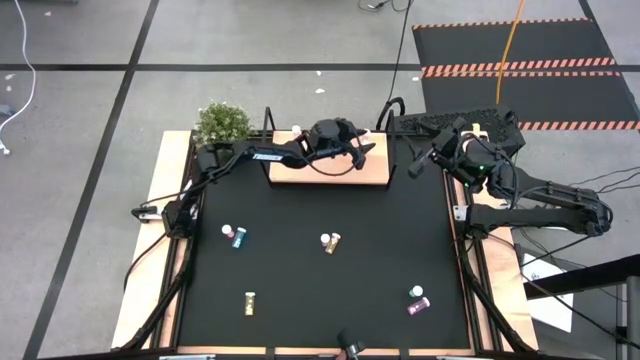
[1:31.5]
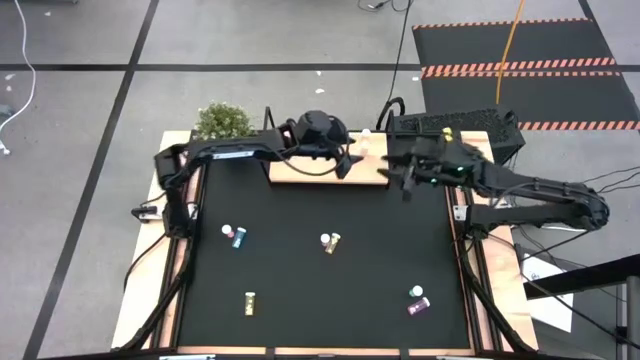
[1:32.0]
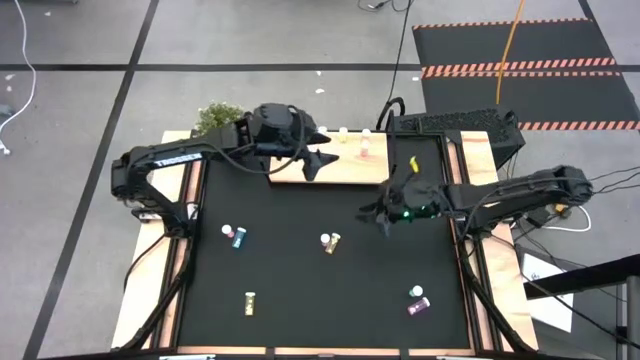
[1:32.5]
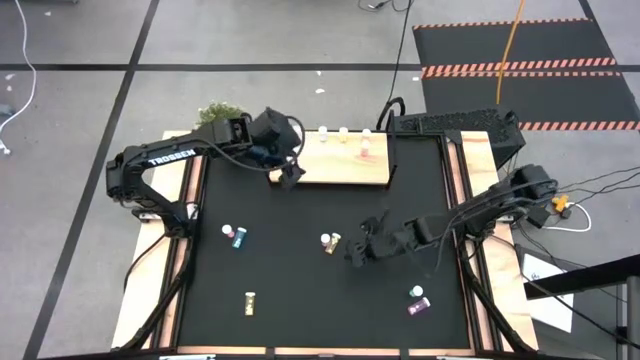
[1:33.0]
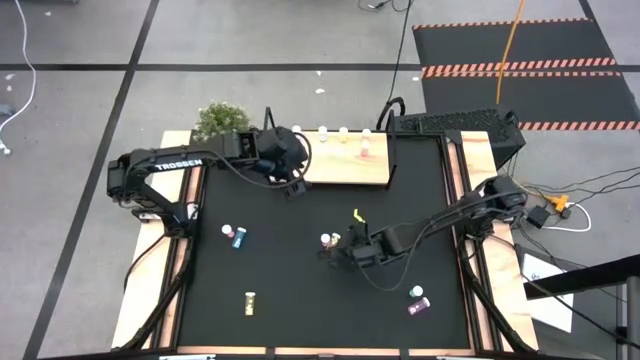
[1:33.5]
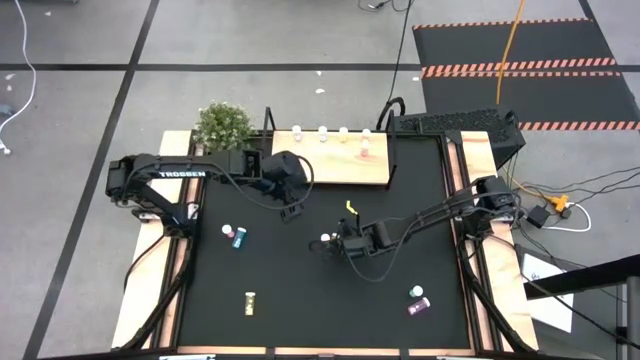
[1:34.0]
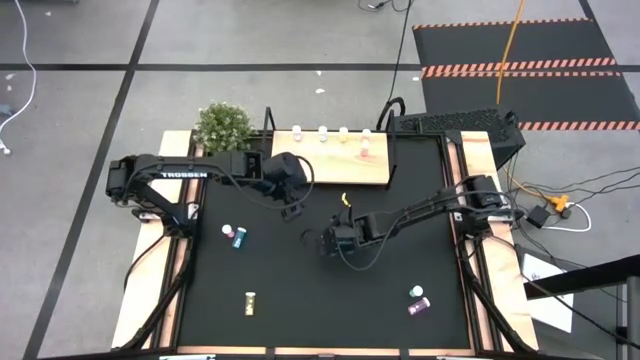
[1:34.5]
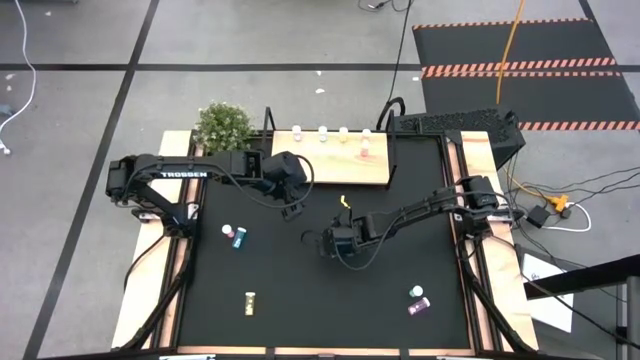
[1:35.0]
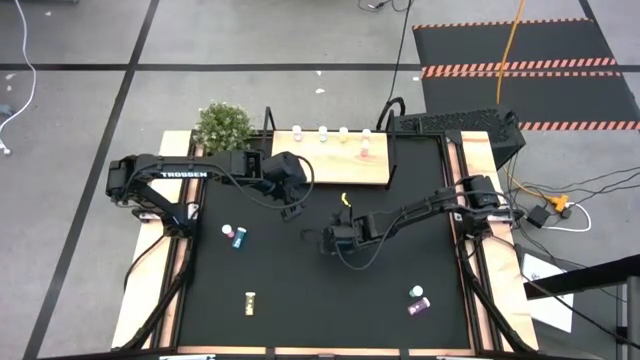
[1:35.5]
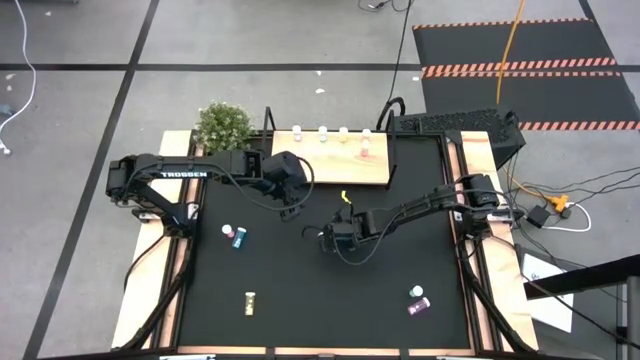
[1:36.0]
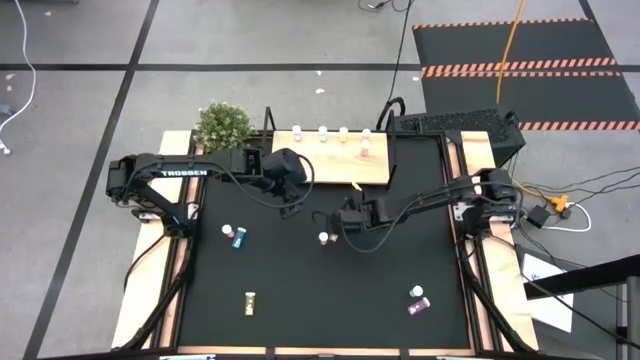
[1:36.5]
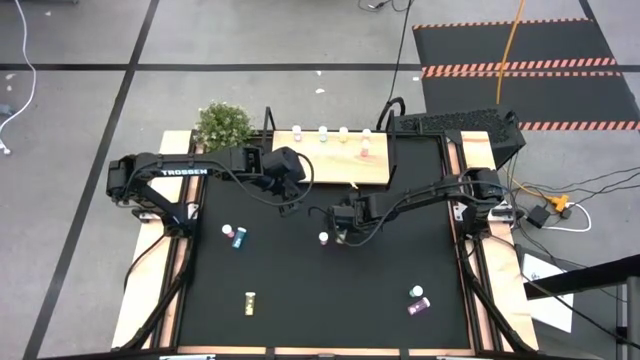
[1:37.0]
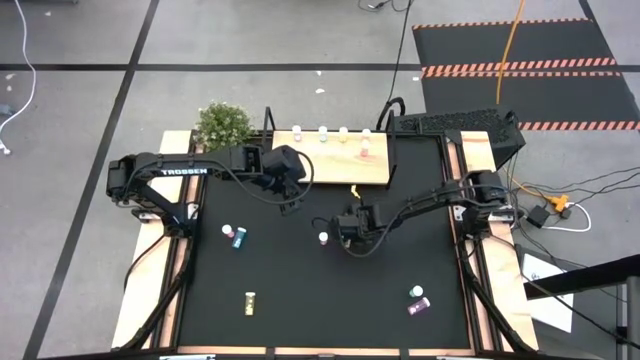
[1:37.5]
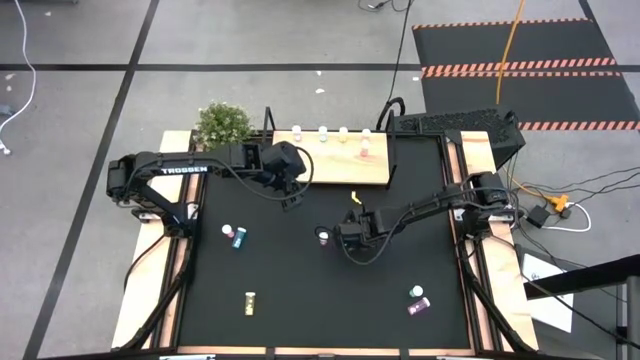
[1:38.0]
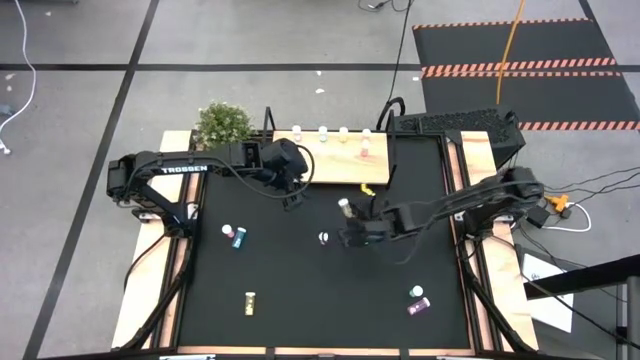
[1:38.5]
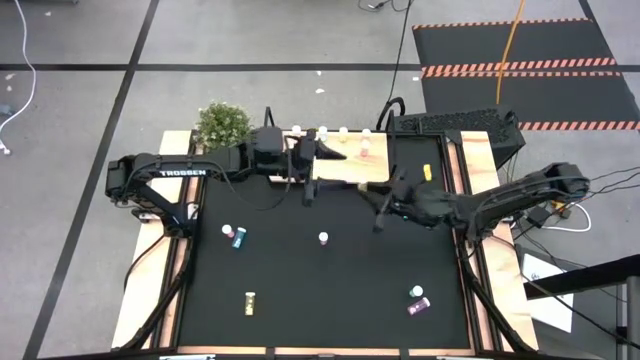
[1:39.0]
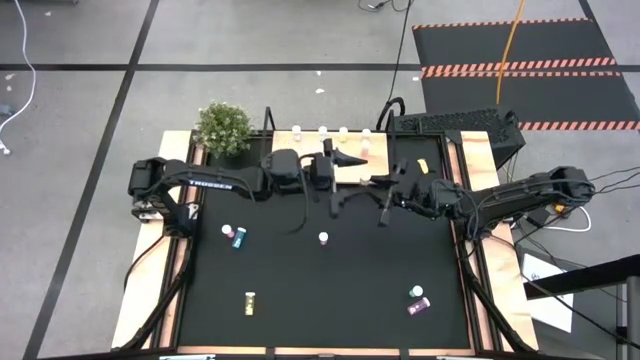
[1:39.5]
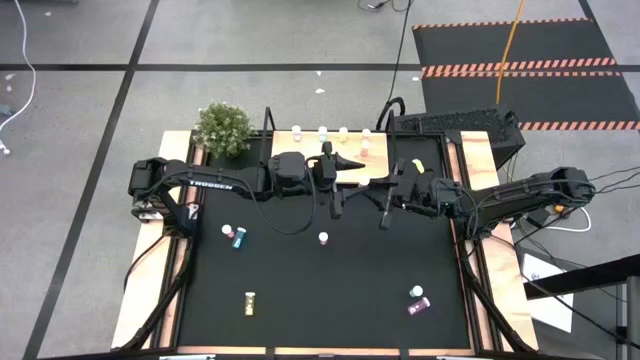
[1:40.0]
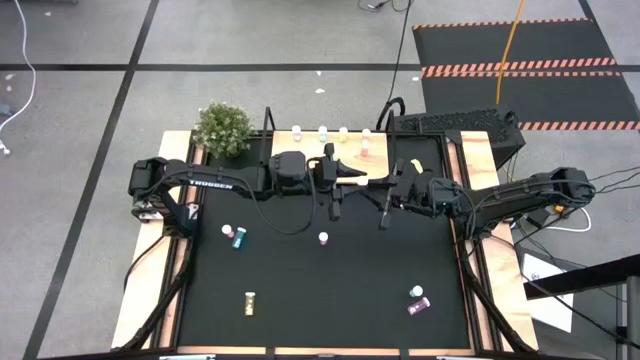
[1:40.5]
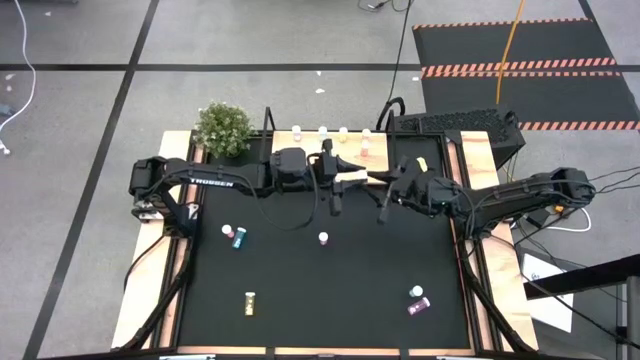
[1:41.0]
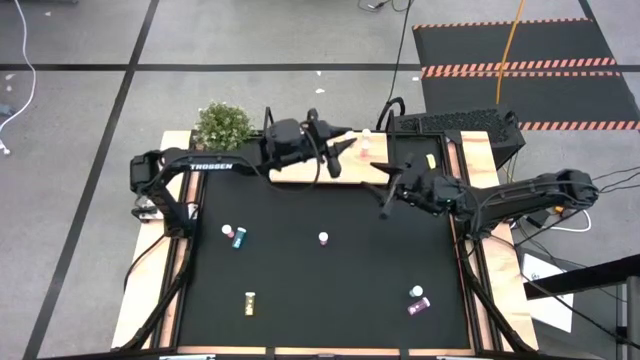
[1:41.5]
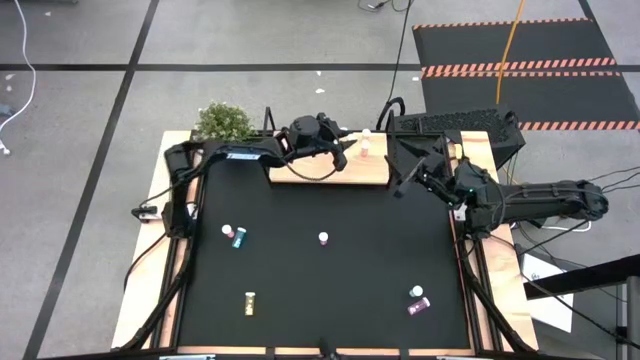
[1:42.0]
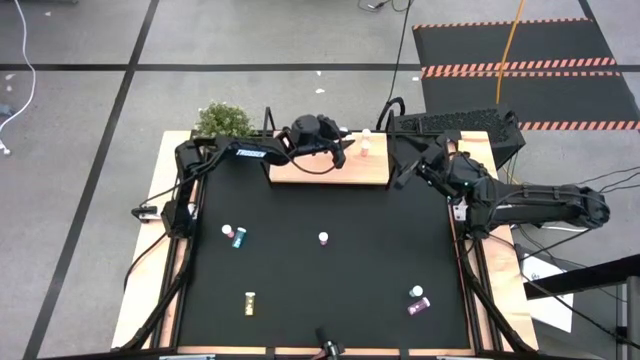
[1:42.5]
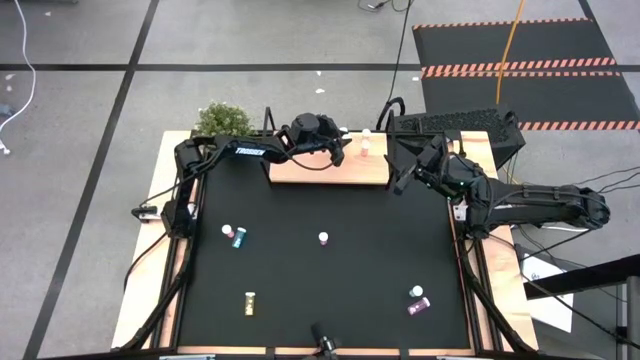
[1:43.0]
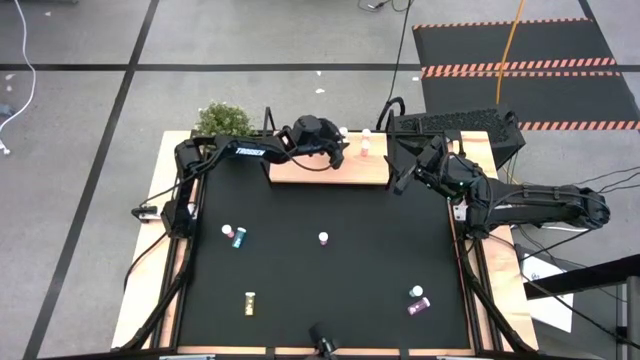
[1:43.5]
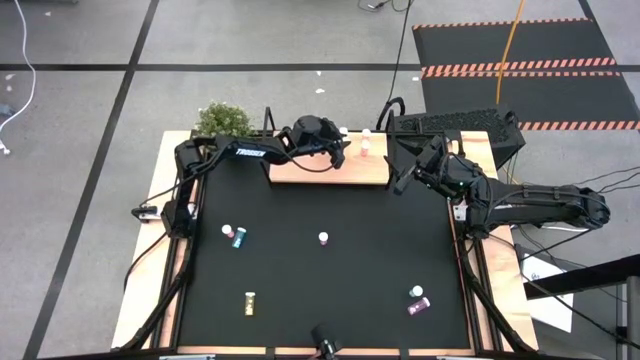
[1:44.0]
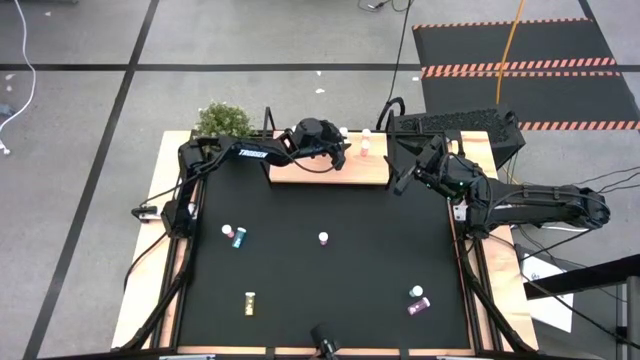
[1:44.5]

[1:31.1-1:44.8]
Task: Pick and place medicine bottles onto shelf by color
Put the top yellow pill bottle on the shelf aligned with the other yellow pill bottle

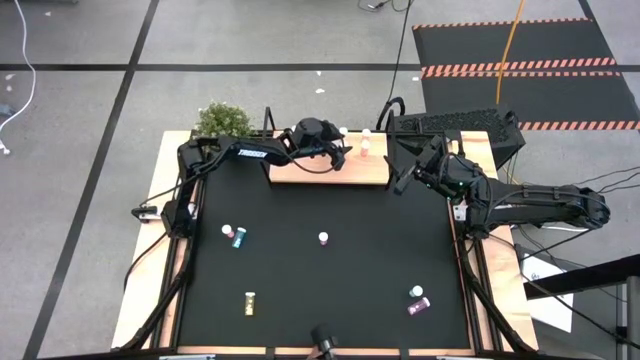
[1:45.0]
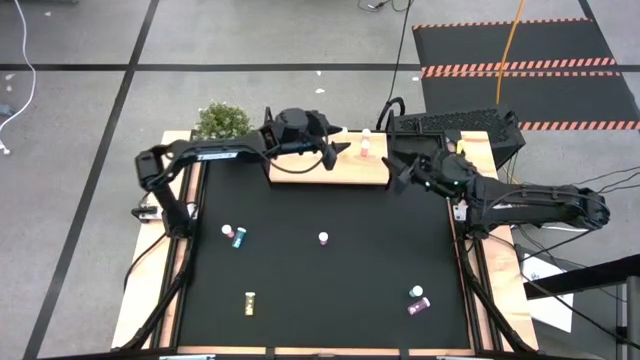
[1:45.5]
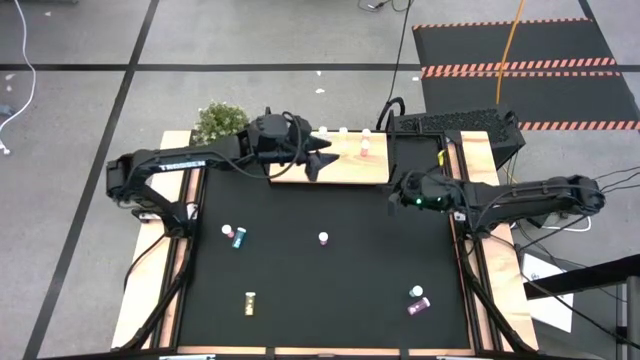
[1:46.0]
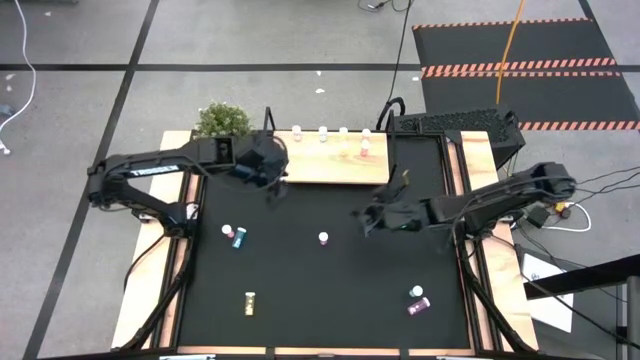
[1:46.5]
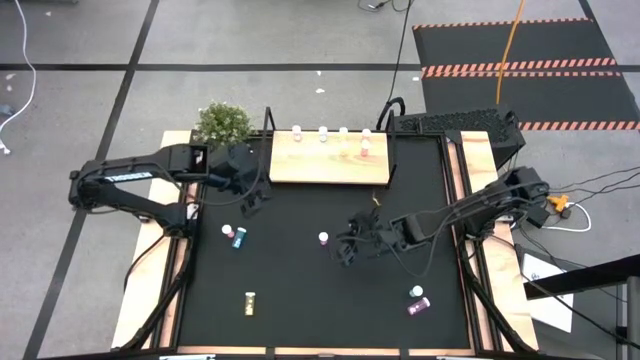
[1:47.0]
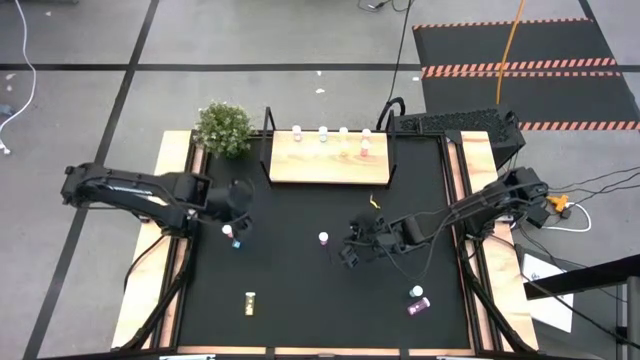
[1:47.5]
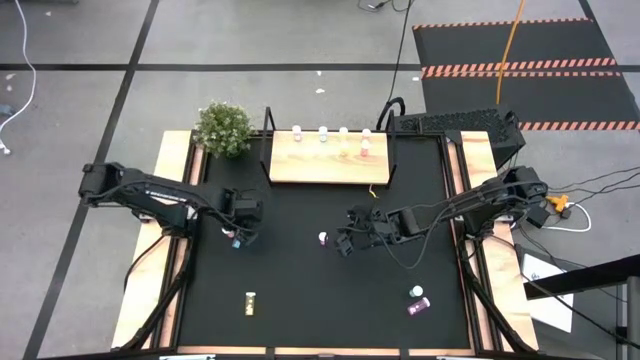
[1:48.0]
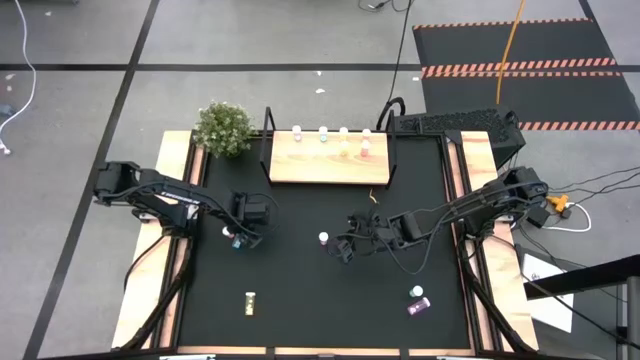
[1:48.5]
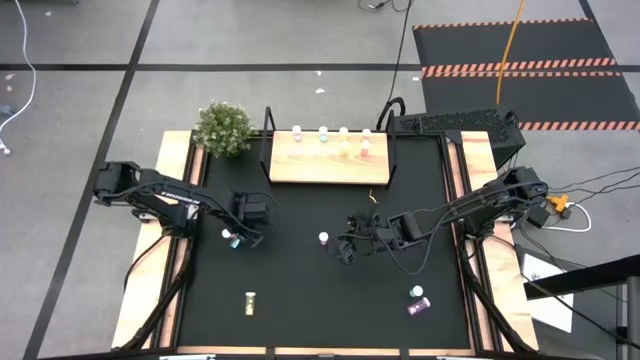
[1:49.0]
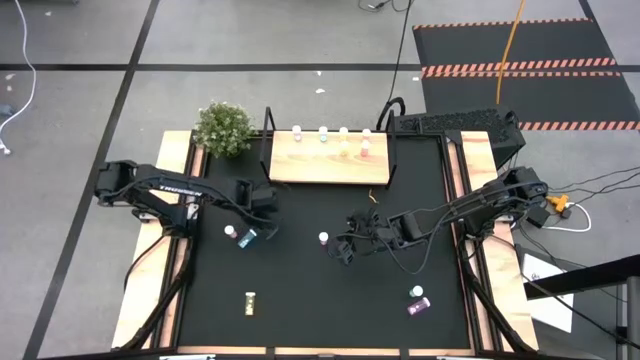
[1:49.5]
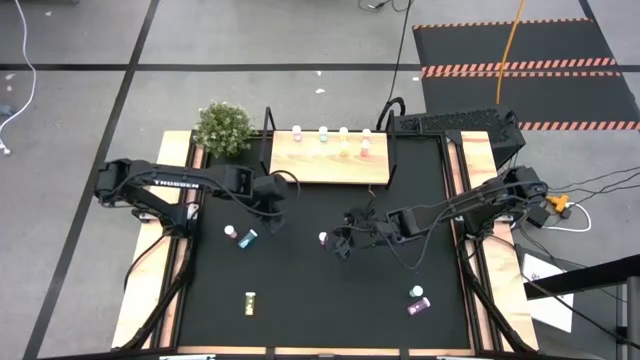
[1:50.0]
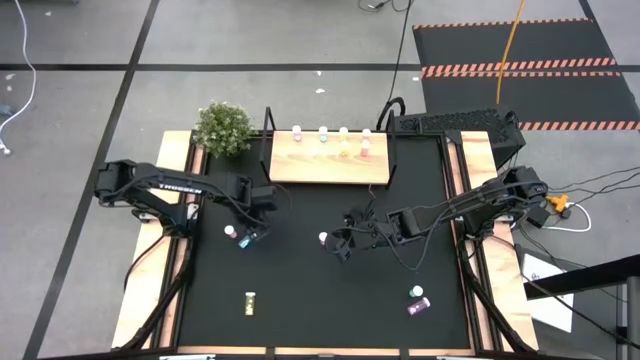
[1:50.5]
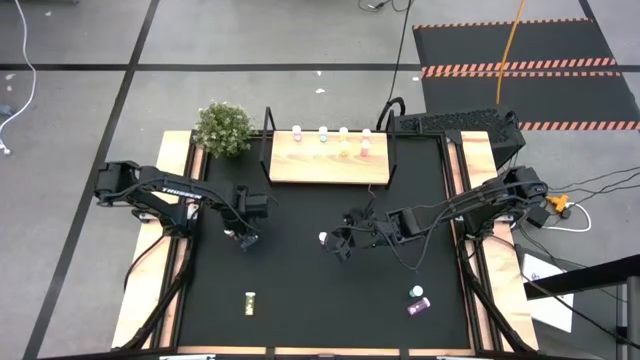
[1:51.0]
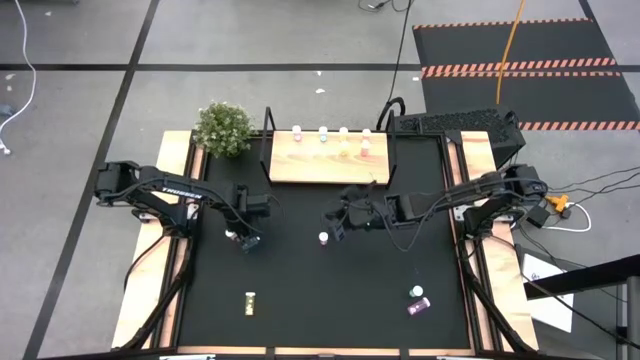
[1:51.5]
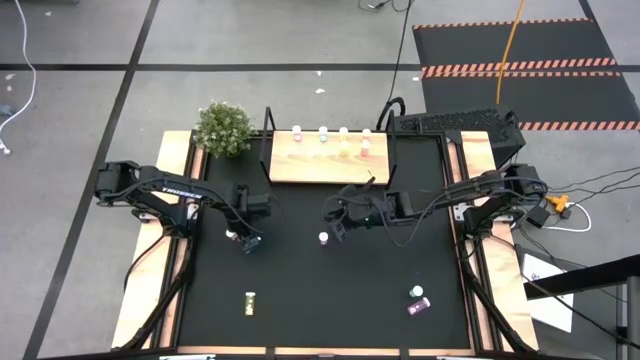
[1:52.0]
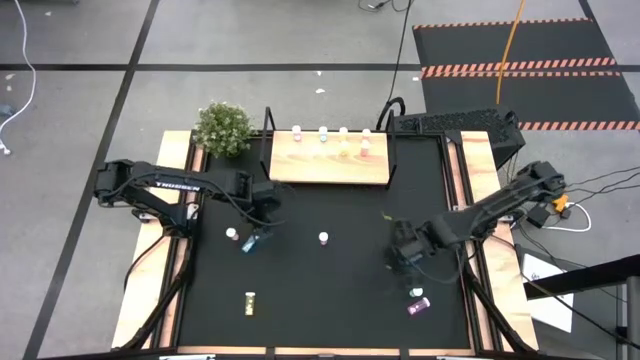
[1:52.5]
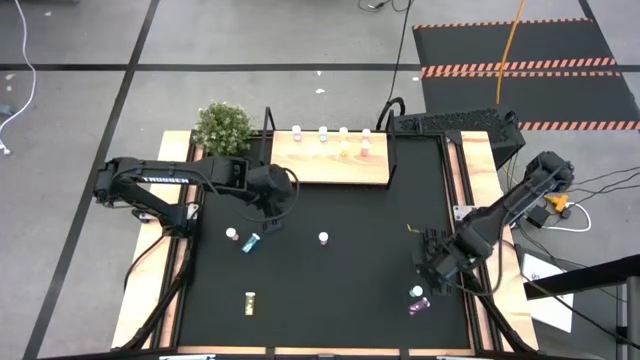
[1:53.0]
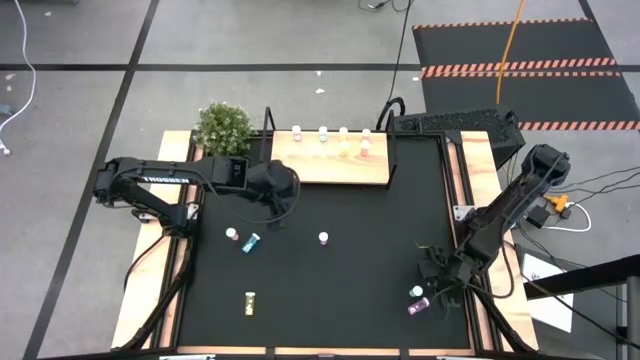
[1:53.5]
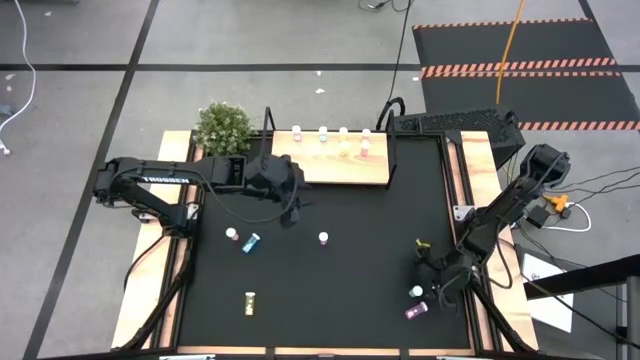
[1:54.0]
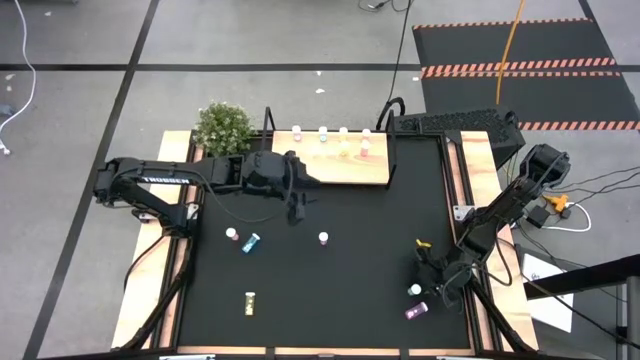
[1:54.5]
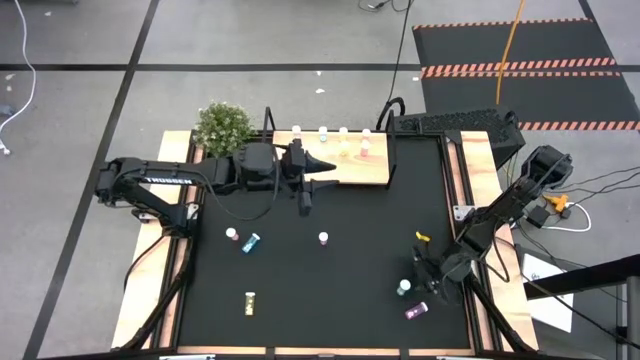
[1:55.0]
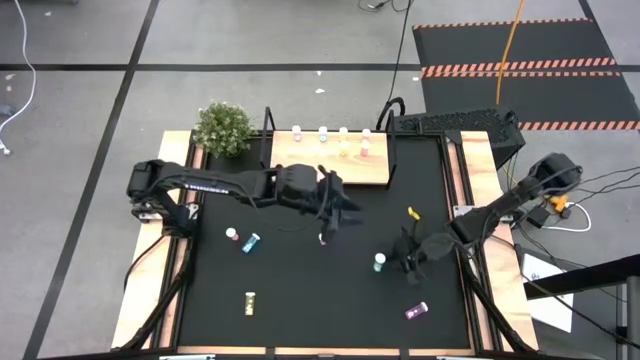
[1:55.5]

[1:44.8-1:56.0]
Put the right blue pill bottle on the shelf aligned with the other blue pill bottle
